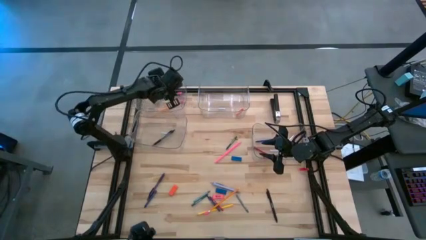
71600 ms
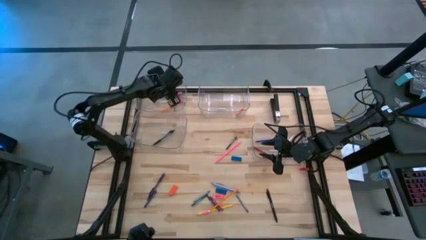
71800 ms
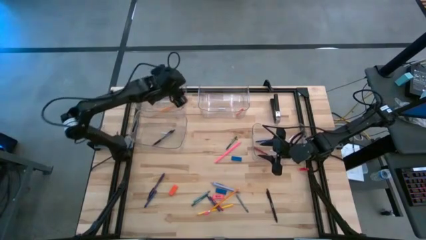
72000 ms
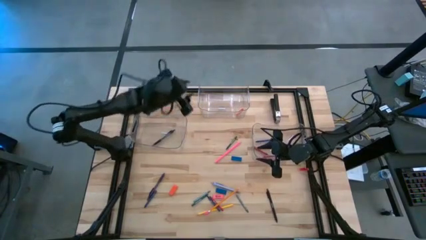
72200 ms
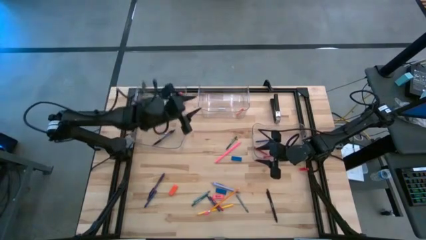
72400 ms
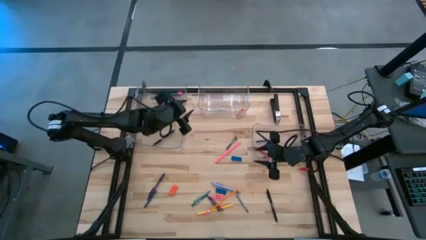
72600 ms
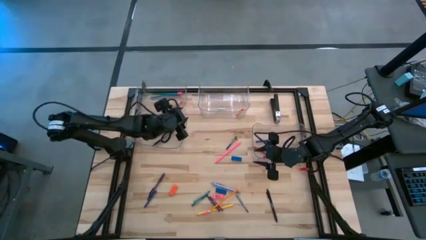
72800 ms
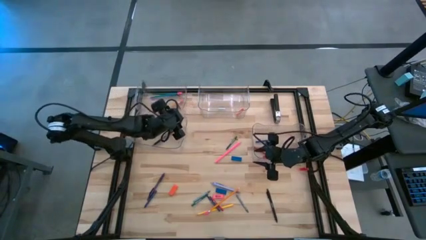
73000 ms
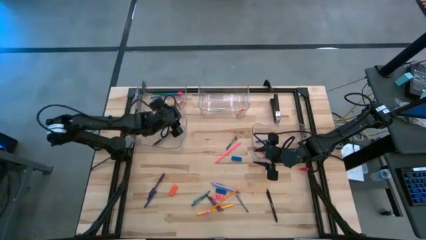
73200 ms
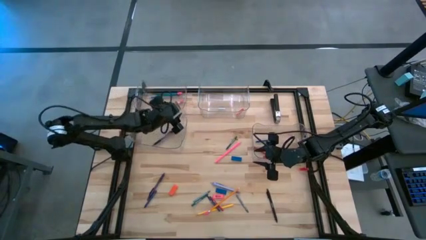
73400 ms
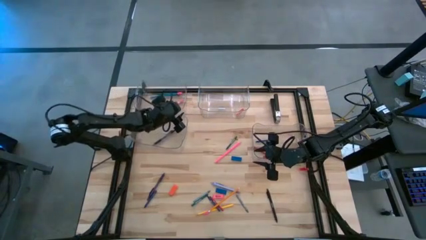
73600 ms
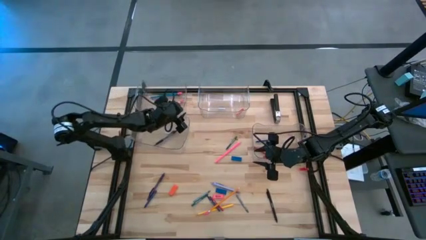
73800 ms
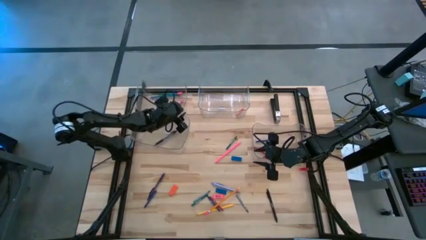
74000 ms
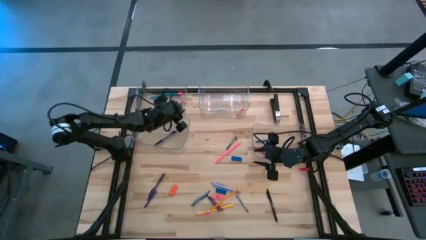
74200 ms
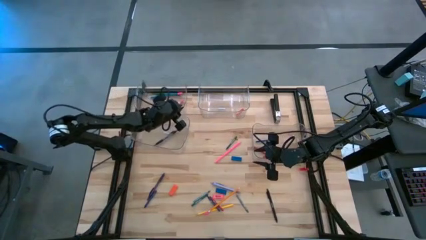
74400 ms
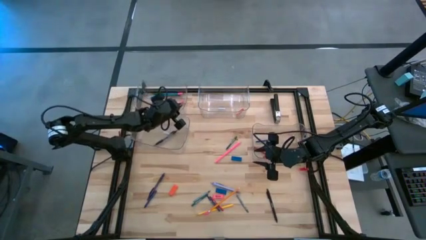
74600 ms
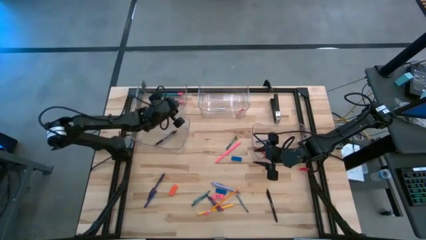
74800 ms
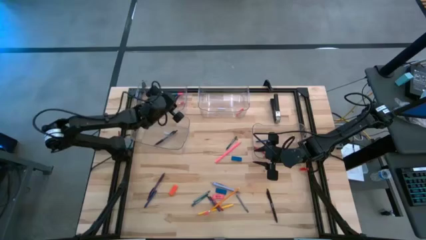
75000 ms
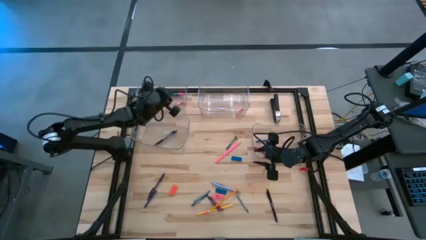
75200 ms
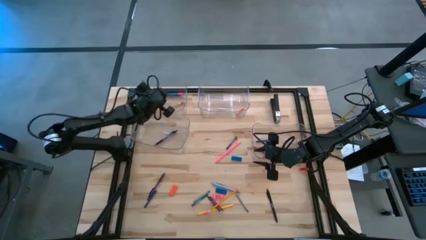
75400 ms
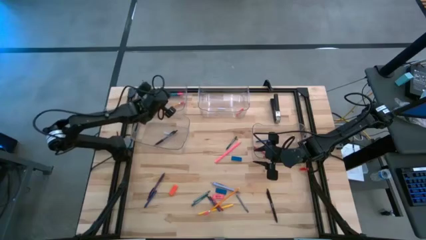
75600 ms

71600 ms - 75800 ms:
Task: Sort crayons/erasers/pens/pencils in bins
Put the green pencil into the top left transparent bin

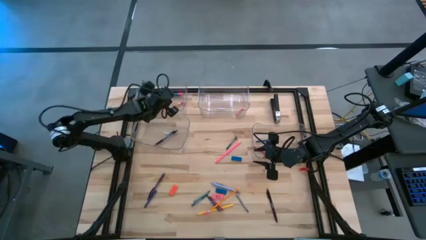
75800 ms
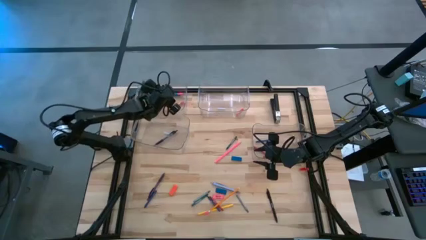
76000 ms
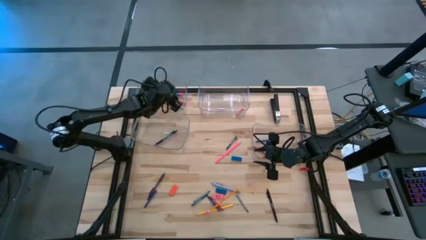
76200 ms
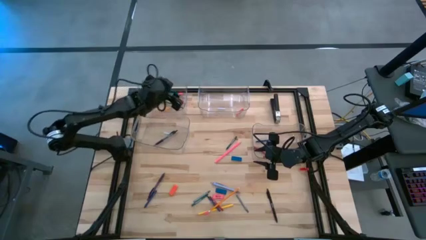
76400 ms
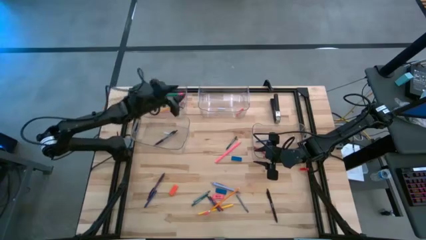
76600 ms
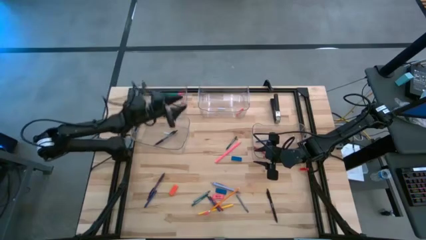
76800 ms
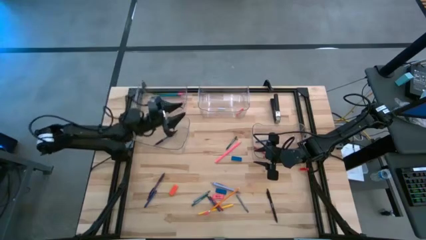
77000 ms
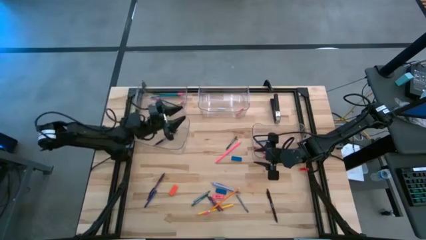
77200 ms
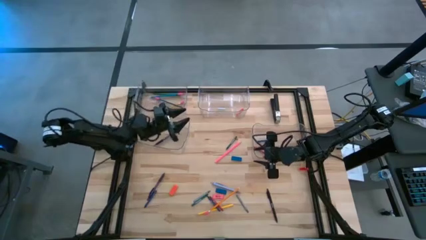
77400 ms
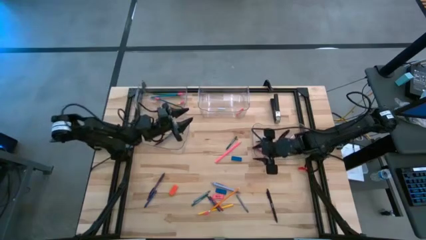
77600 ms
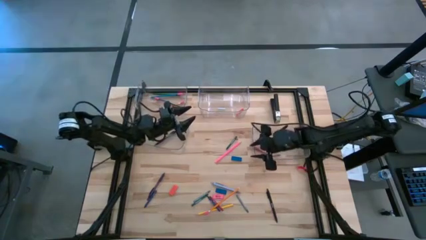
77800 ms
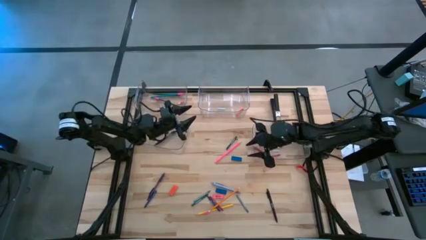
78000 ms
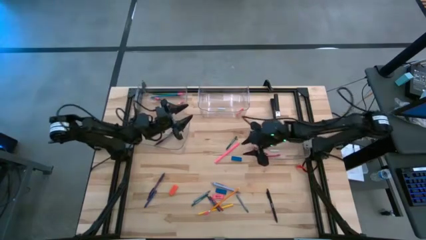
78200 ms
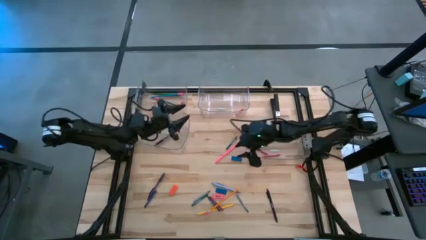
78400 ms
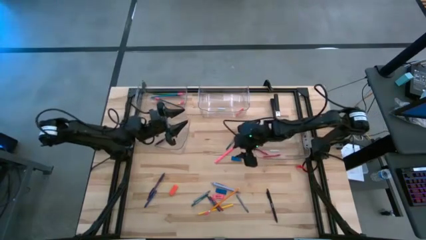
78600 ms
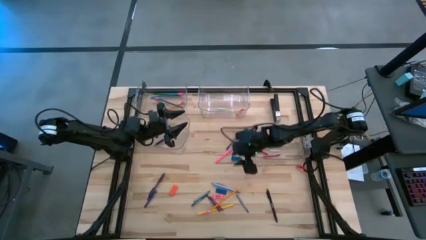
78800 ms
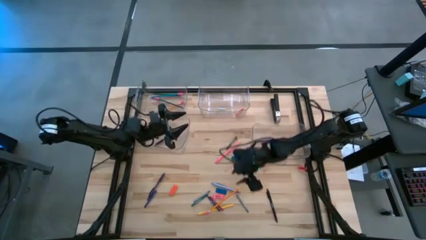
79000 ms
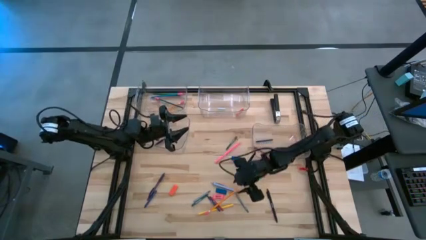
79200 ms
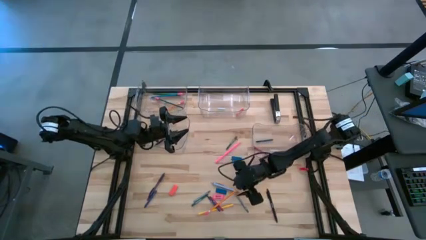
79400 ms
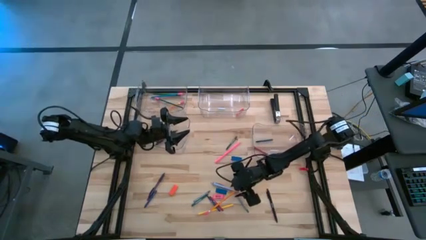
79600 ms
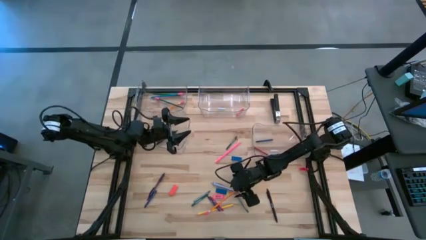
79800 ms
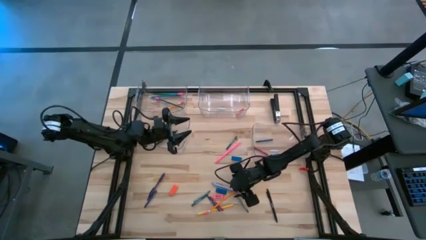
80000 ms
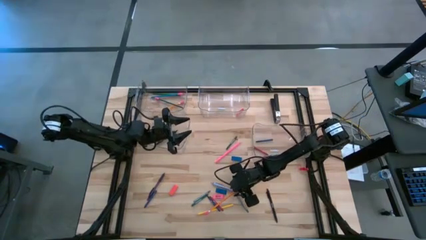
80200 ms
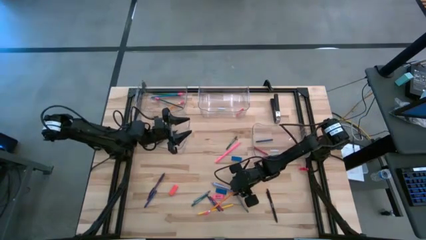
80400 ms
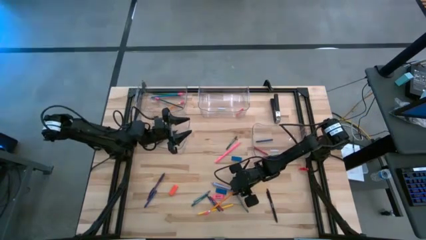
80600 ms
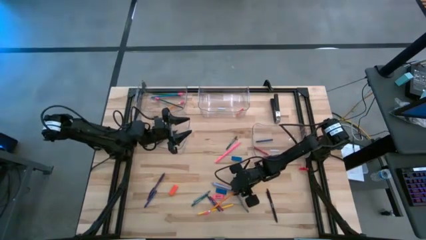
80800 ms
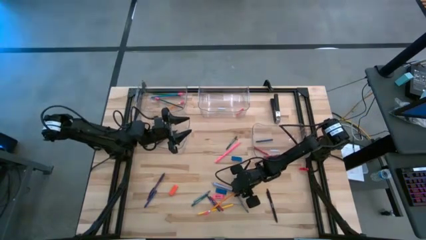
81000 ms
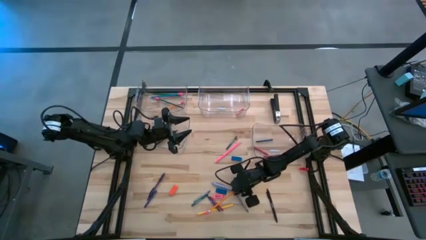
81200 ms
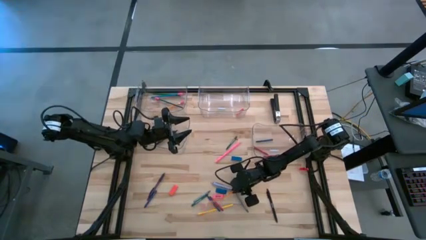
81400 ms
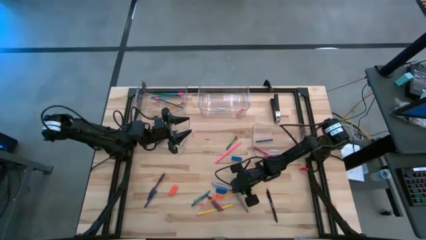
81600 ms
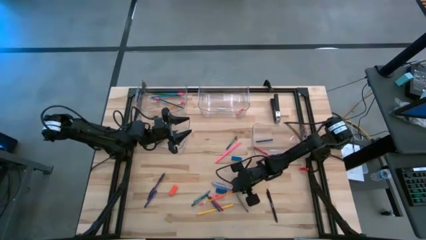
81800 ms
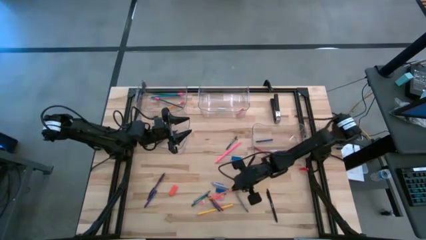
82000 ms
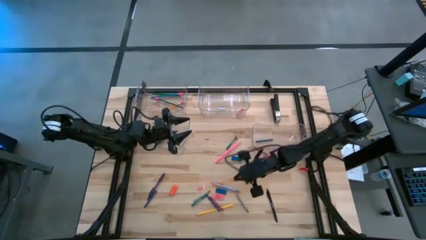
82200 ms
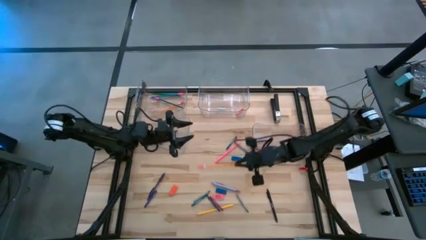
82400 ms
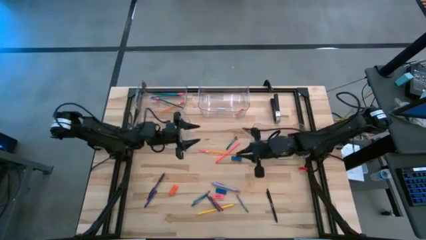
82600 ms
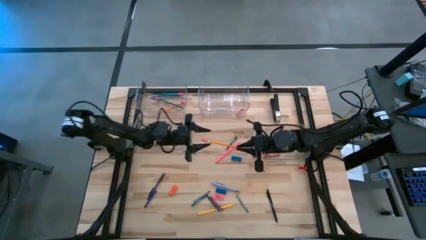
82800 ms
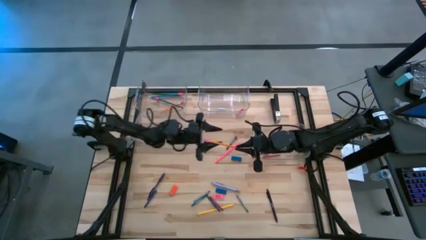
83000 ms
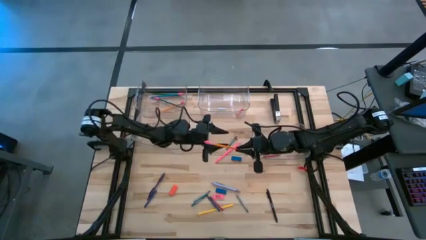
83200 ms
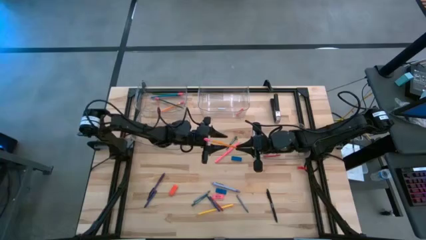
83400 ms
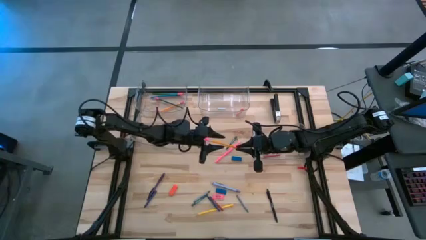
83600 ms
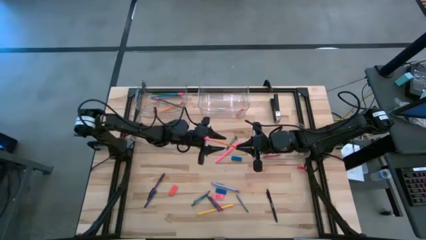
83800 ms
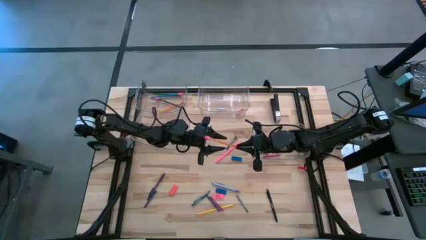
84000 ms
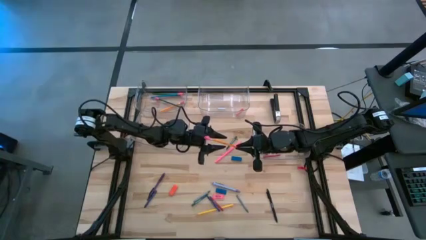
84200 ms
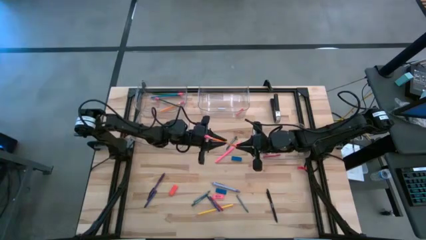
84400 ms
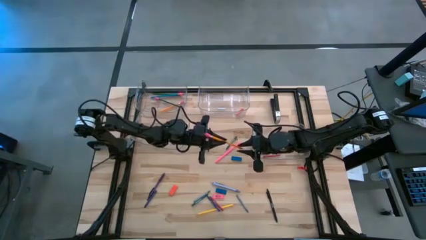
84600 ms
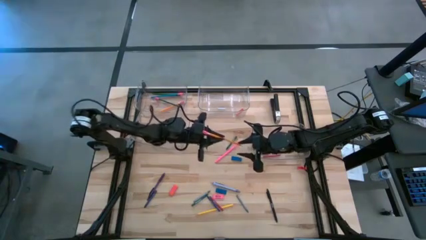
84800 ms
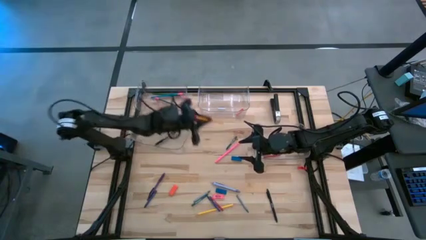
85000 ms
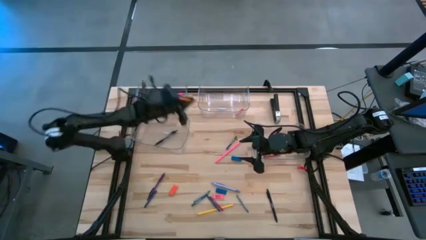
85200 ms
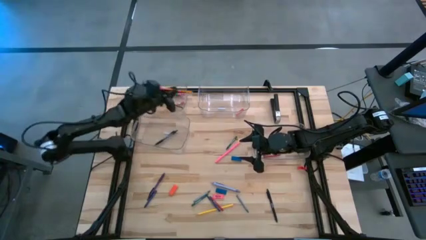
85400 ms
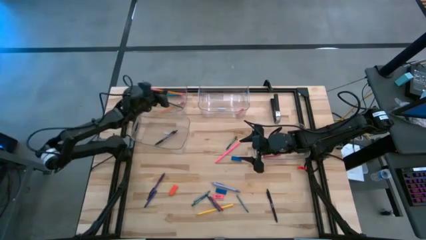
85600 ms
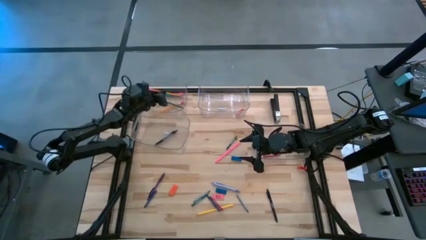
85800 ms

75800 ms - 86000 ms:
Put the orange pencil into the top left transparent bin
